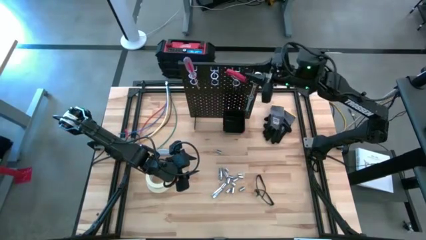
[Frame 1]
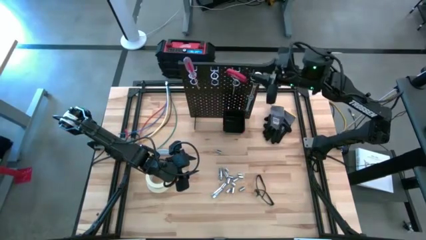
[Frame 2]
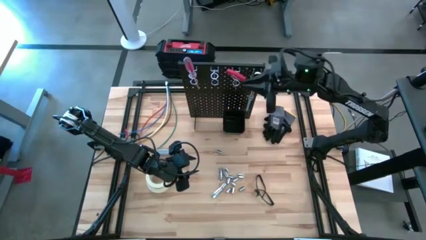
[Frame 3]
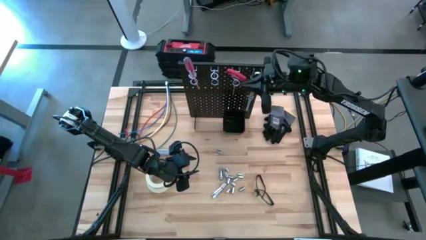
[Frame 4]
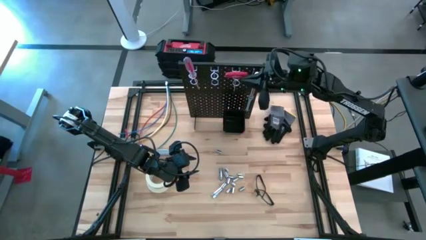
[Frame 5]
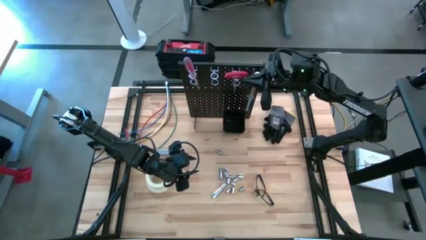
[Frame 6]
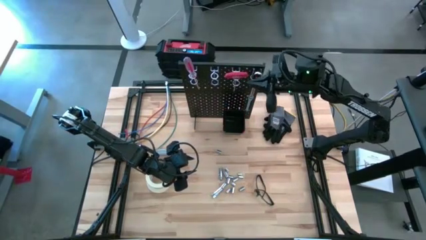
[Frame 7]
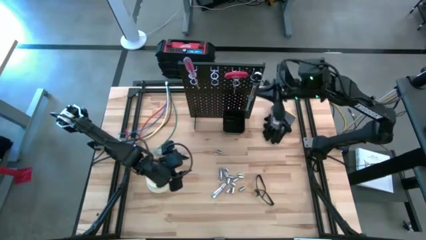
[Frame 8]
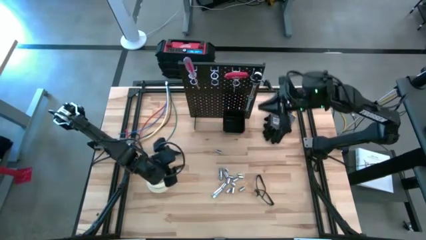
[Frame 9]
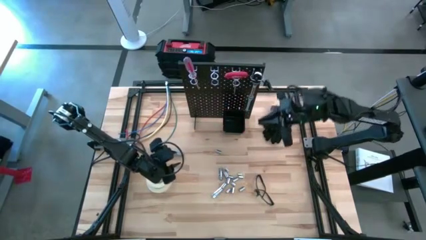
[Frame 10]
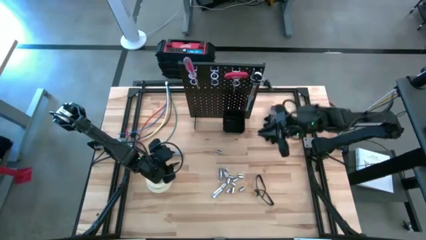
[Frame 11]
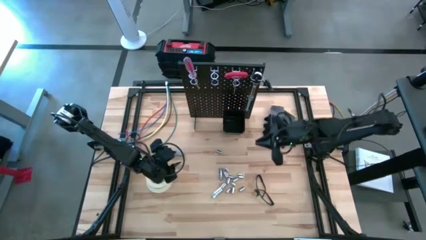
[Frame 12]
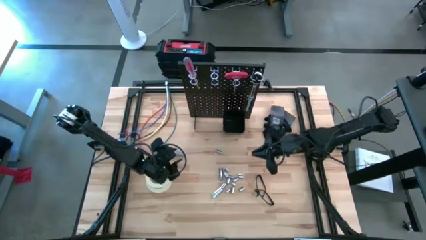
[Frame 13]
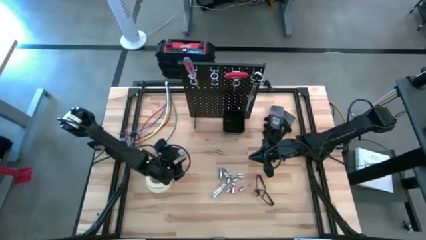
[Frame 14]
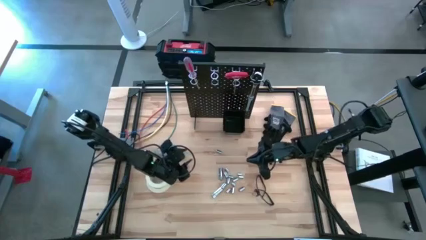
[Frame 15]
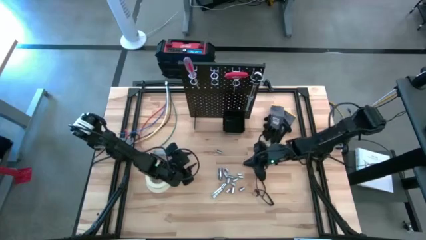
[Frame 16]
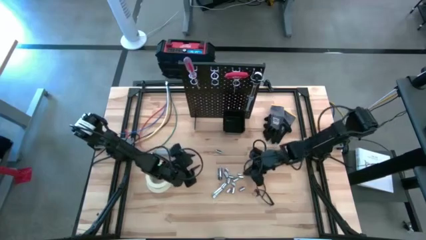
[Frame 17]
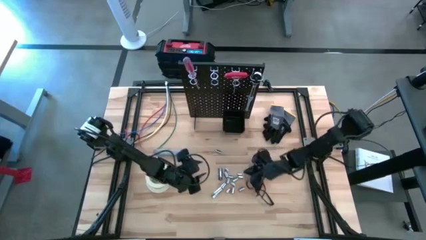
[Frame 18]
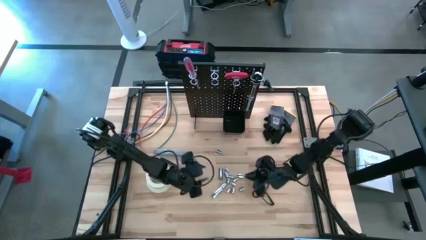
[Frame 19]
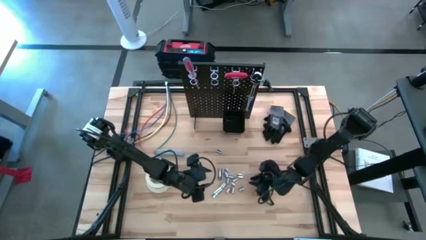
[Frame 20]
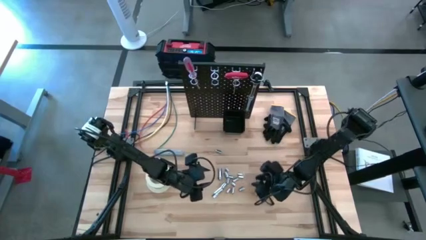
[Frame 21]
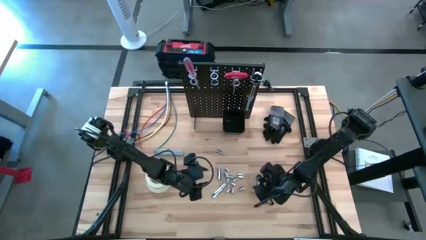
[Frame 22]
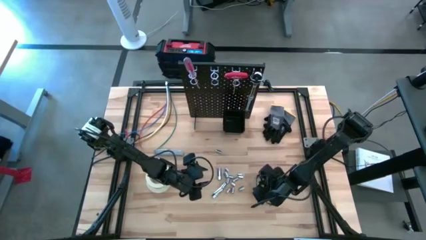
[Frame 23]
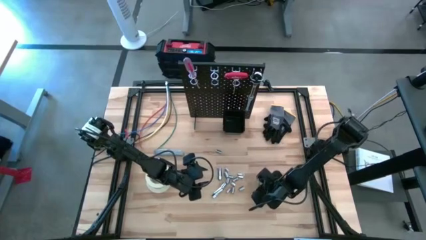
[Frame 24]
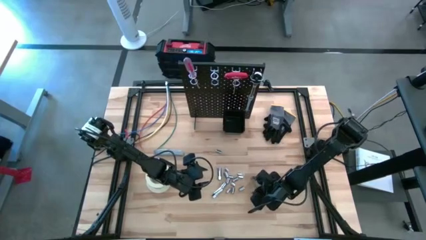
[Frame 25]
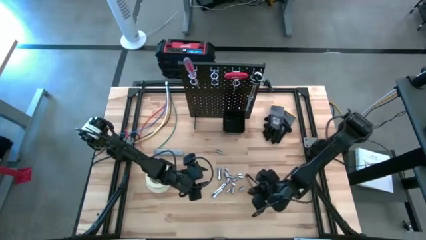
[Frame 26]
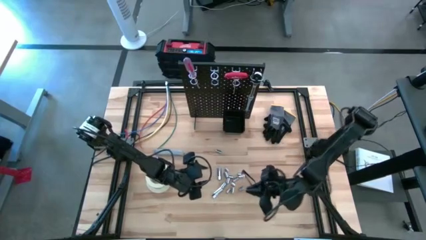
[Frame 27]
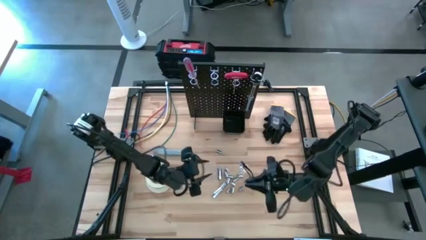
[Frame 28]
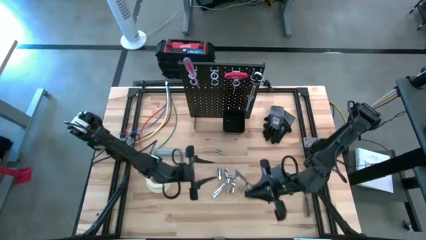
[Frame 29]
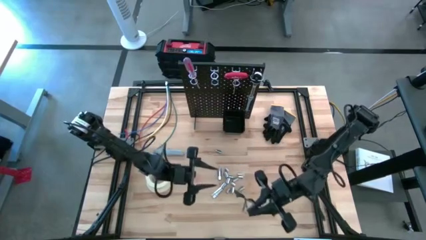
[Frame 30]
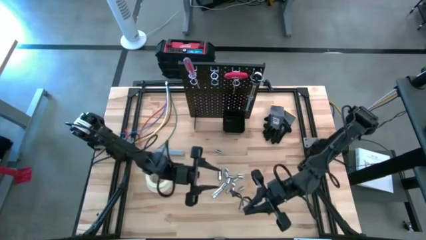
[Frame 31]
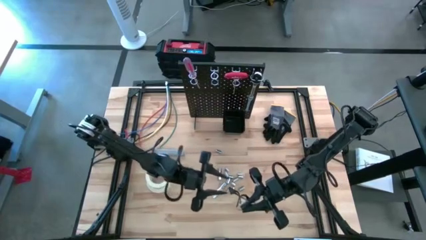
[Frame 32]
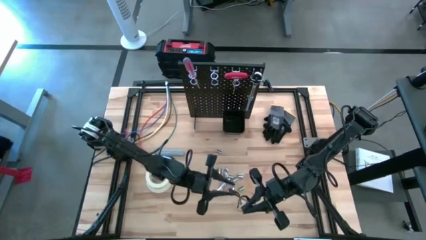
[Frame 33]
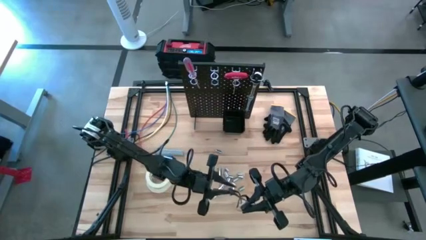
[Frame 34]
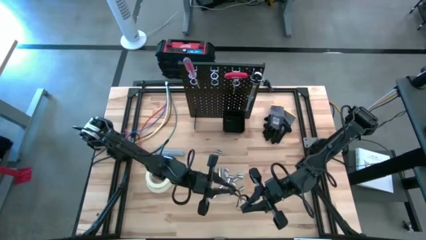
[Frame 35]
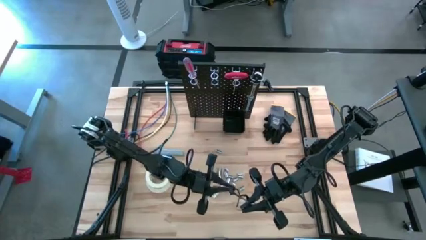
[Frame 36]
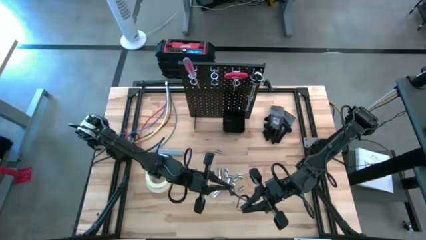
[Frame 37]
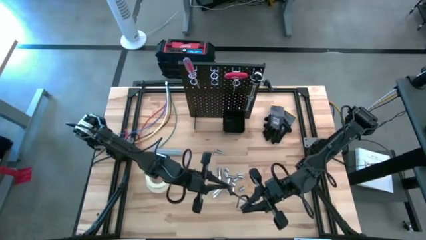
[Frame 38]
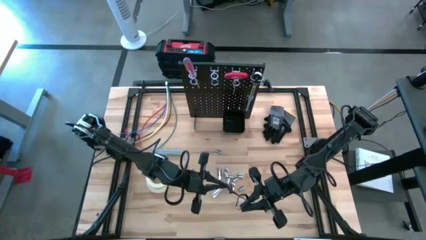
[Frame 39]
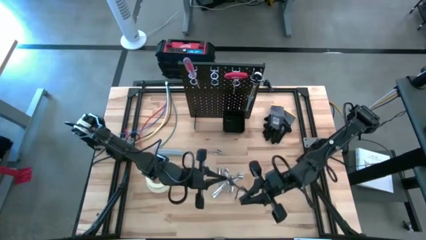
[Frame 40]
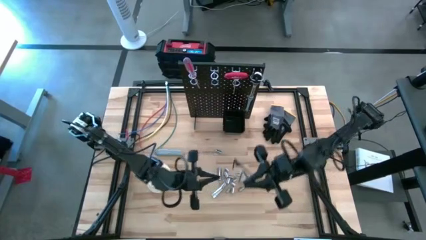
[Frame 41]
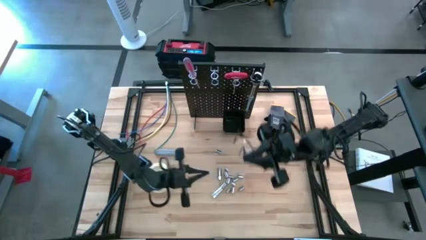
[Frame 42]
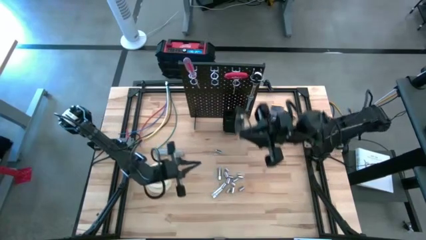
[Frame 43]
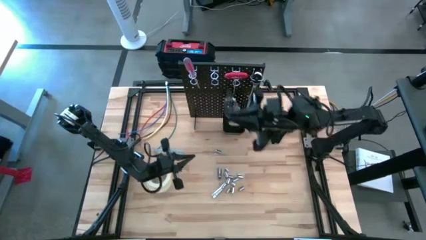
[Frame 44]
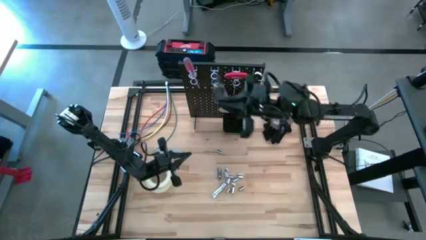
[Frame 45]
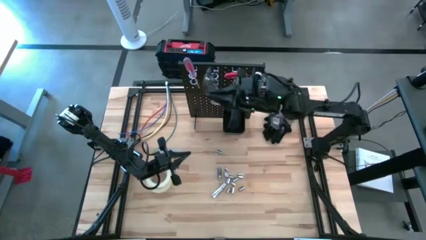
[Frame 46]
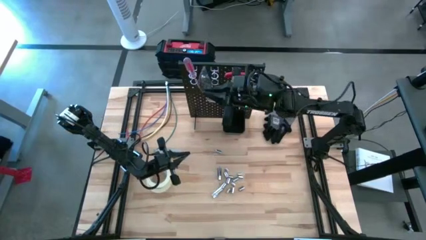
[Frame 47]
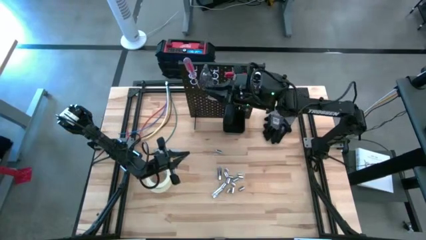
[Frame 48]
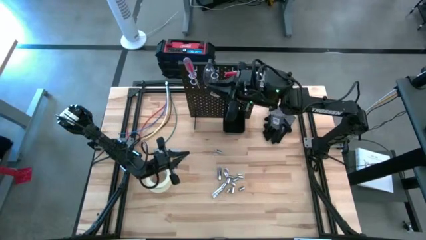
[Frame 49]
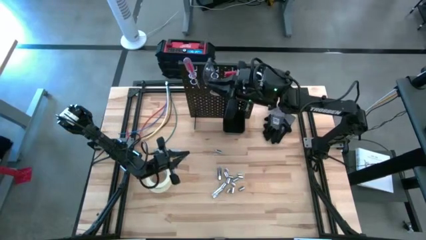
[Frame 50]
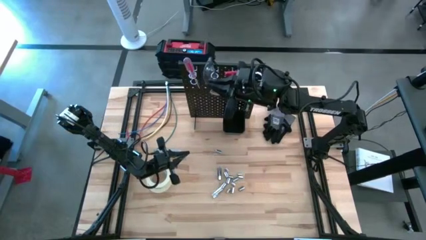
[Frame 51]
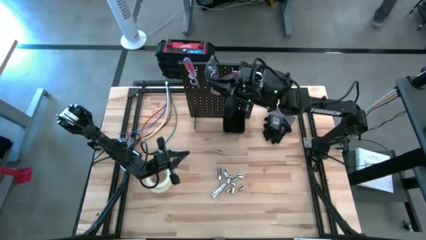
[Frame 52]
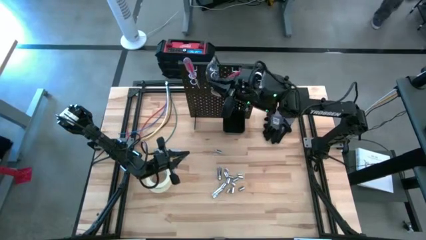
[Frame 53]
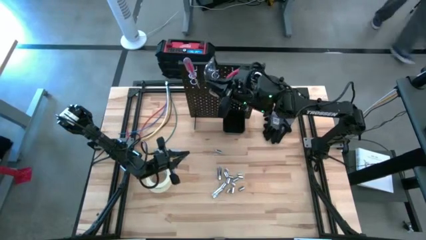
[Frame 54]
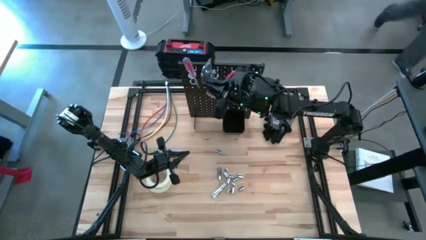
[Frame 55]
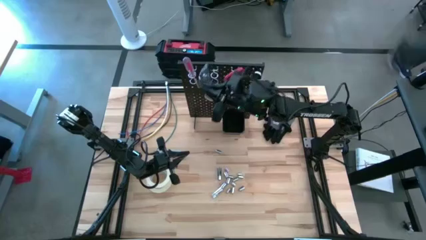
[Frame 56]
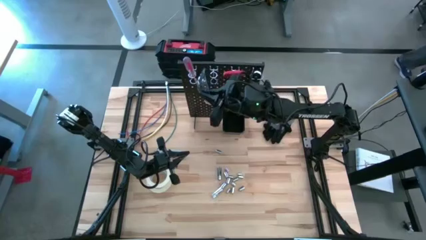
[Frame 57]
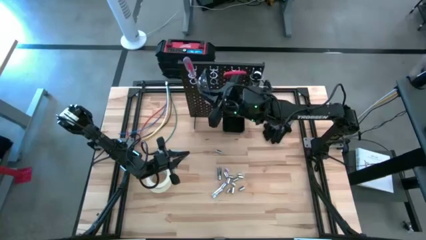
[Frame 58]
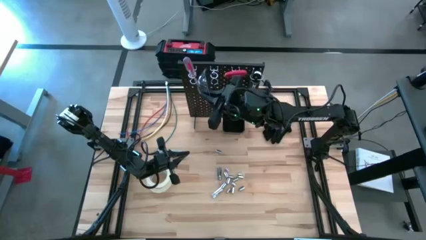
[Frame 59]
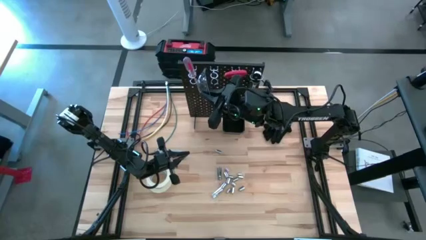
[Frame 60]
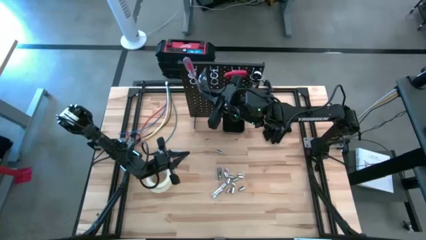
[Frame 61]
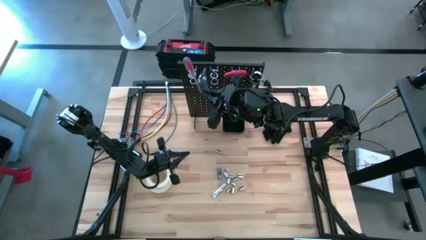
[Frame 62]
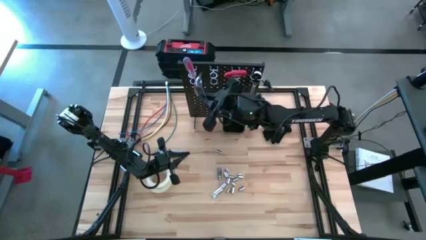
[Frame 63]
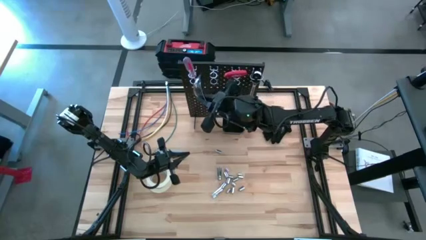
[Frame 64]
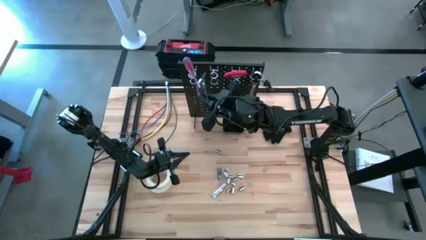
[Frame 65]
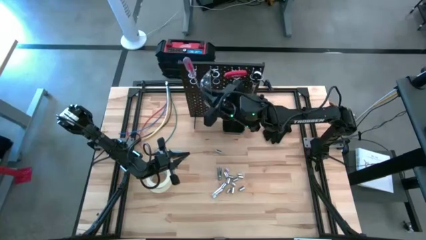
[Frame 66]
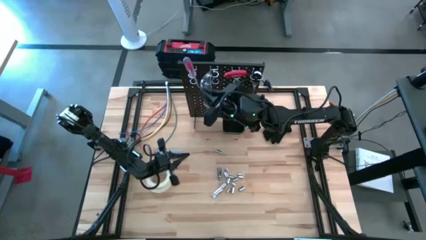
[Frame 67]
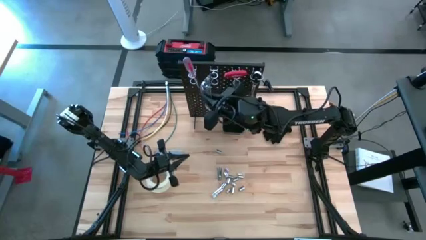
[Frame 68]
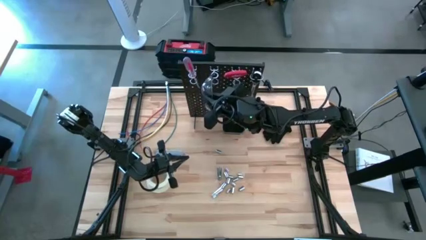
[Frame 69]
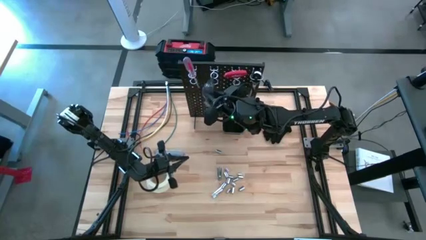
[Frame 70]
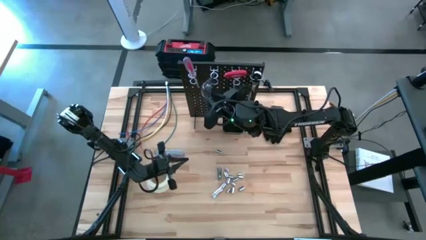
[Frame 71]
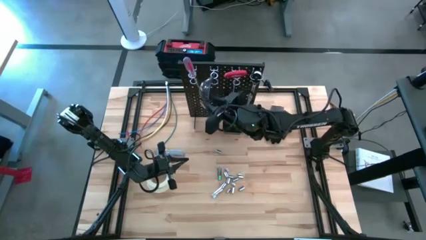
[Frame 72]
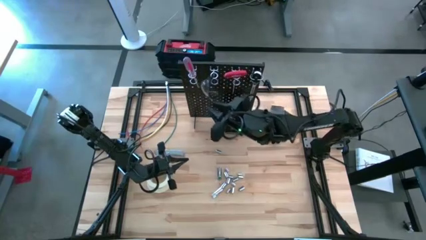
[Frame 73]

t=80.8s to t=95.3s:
Task: Hang tools onto peg board
Hang the black safety glasses on the peg board

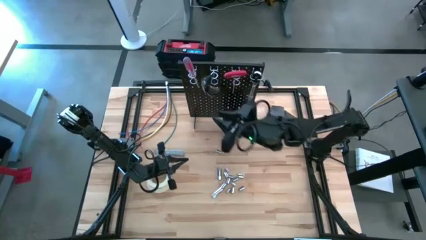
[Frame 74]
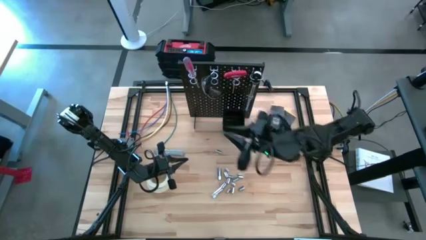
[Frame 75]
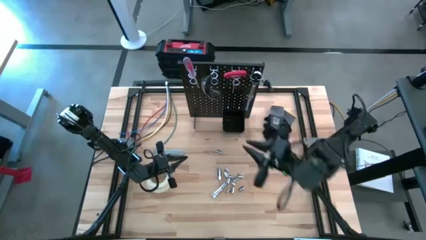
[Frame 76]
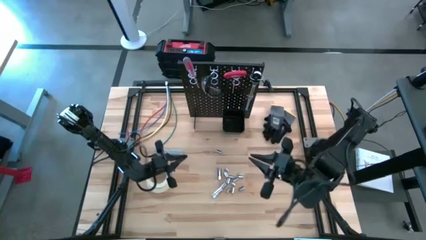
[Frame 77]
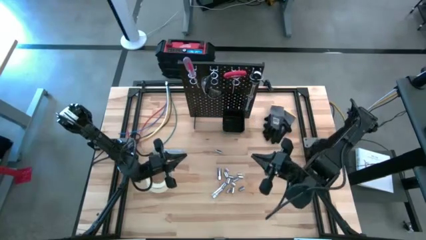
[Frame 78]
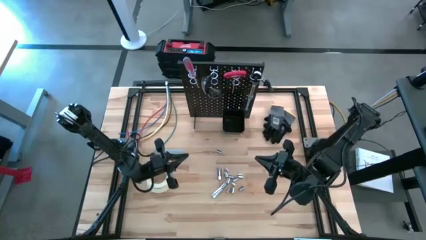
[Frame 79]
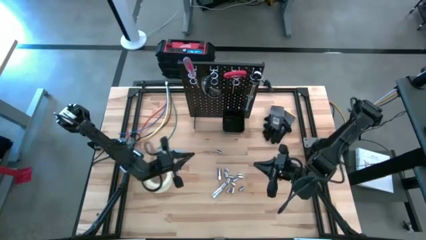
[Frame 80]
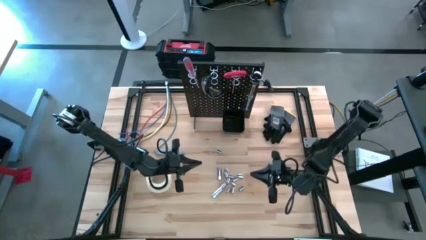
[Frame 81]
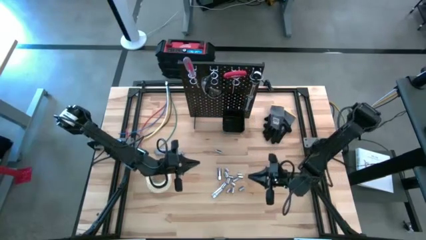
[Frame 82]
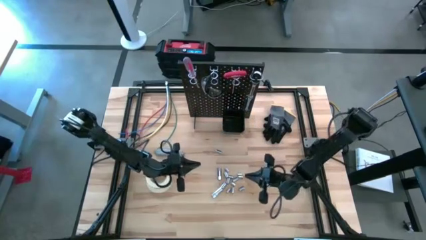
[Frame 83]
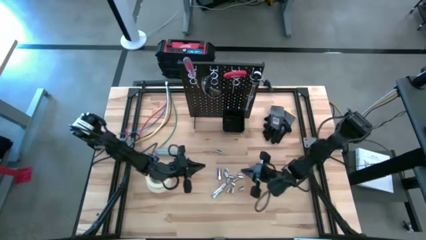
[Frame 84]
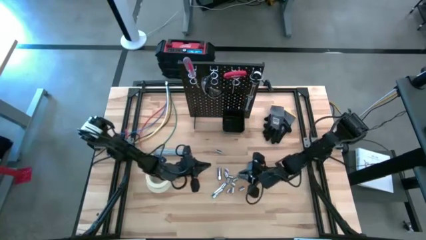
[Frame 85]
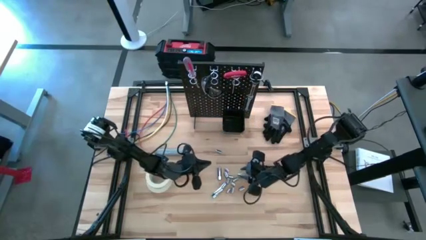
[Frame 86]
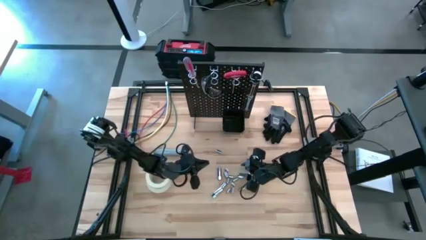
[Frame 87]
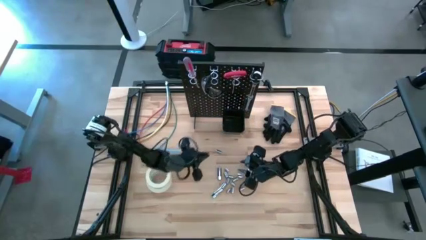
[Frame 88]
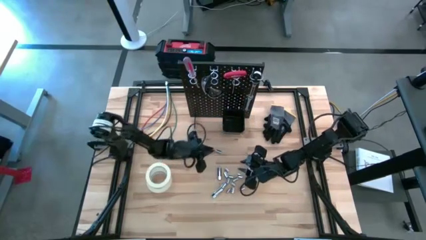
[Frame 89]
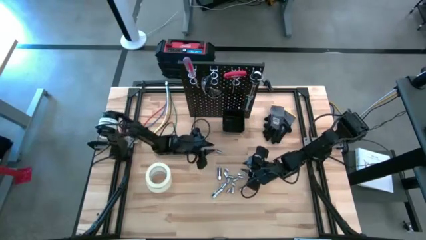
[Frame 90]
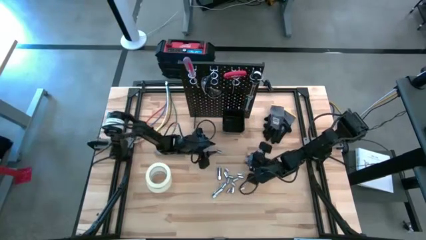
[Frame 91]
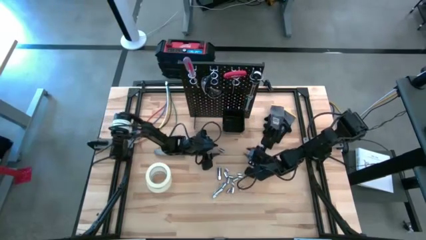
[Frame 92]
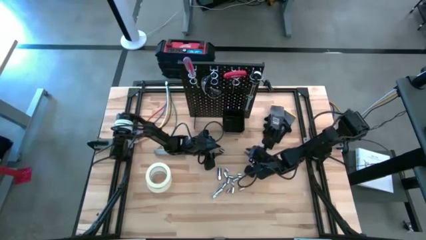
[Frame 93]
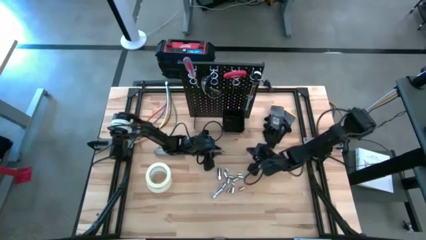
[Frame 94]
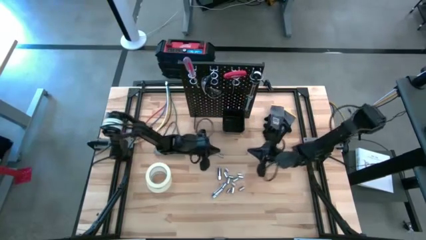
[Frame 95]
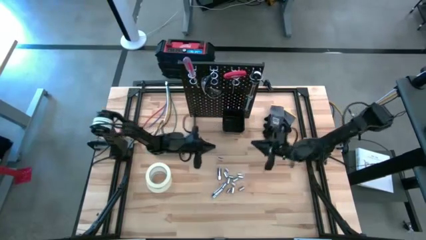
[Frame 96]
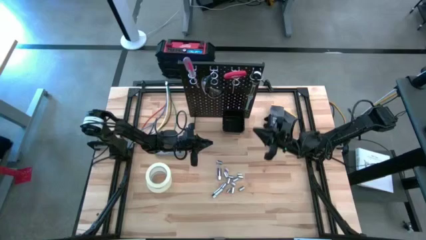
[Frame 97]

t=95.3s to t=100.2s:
Put the socket into the black bin on the peg board
